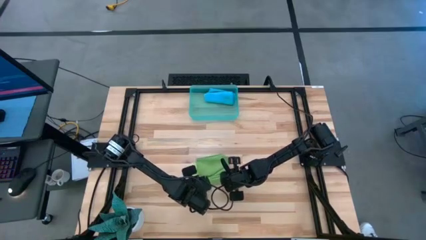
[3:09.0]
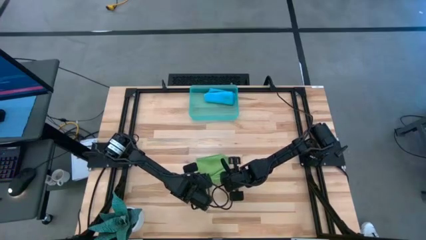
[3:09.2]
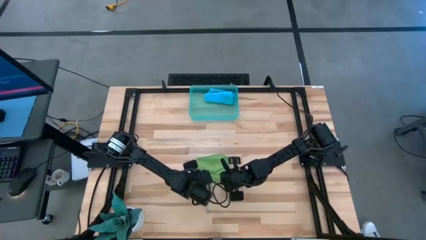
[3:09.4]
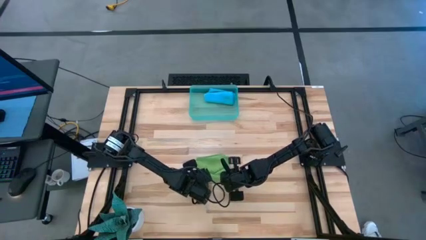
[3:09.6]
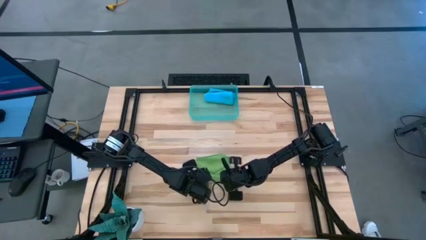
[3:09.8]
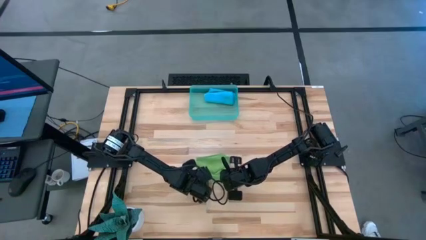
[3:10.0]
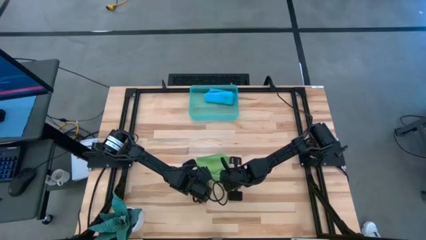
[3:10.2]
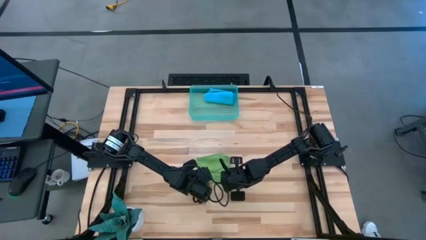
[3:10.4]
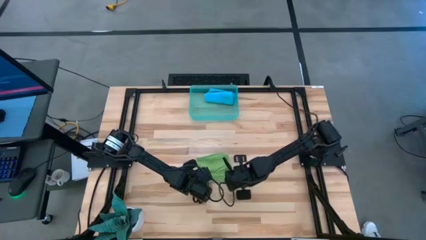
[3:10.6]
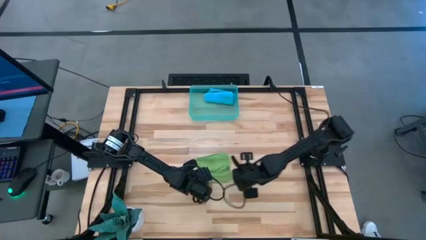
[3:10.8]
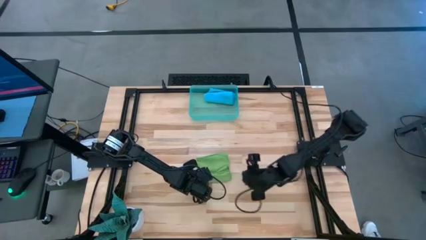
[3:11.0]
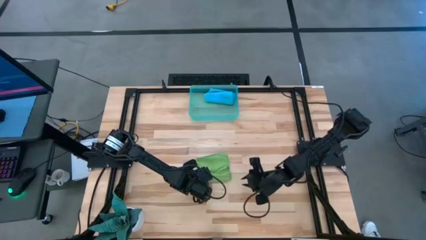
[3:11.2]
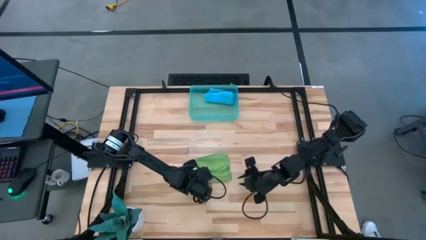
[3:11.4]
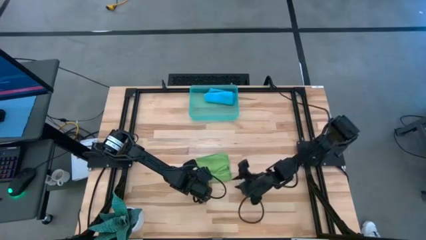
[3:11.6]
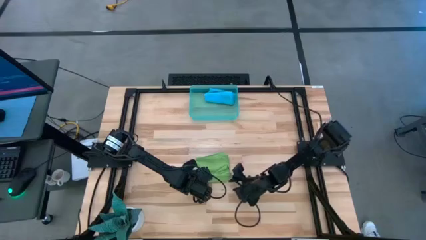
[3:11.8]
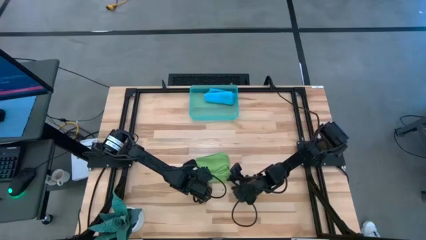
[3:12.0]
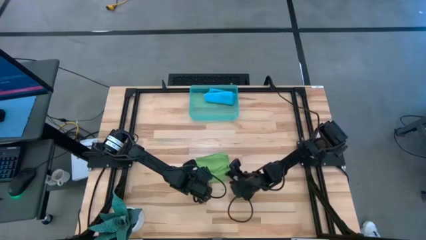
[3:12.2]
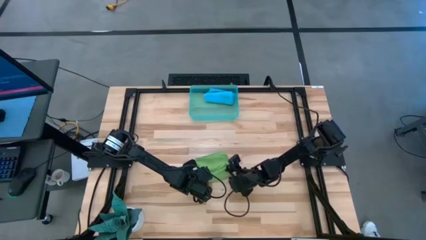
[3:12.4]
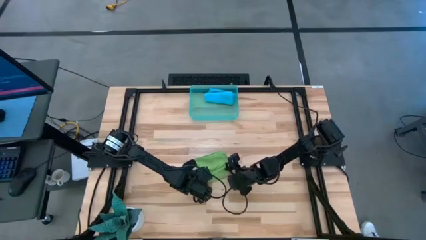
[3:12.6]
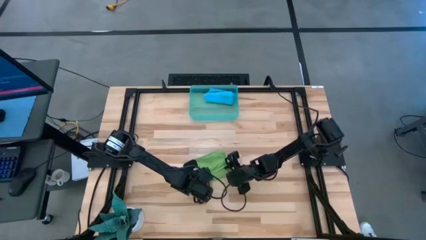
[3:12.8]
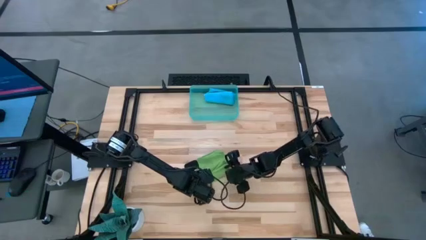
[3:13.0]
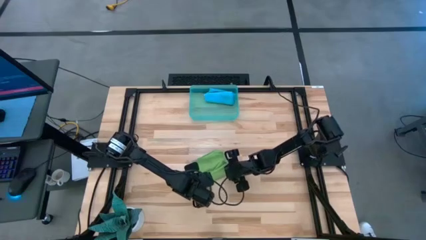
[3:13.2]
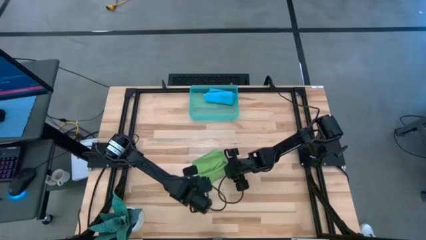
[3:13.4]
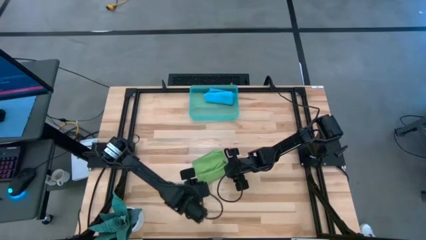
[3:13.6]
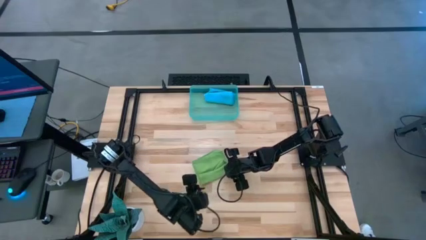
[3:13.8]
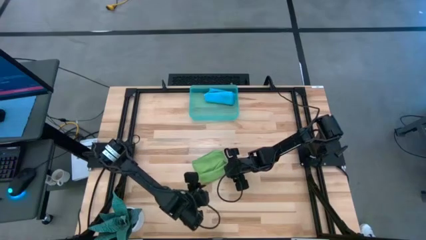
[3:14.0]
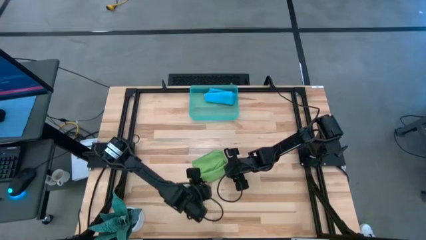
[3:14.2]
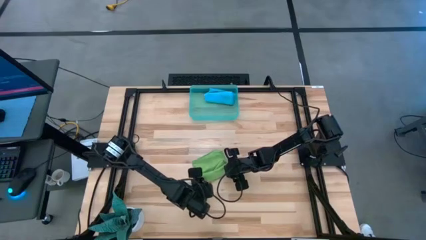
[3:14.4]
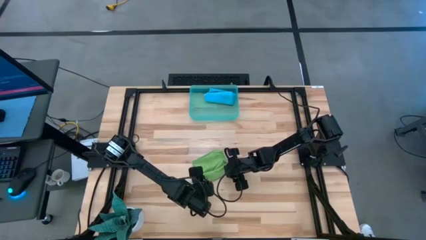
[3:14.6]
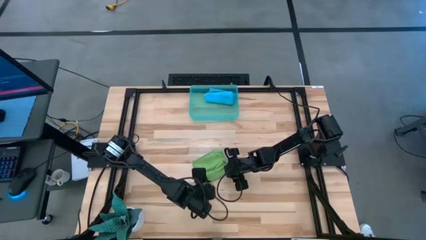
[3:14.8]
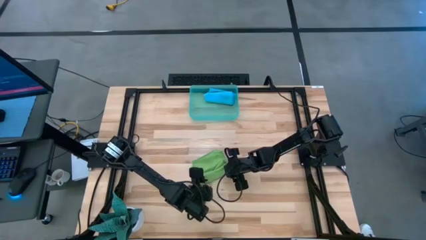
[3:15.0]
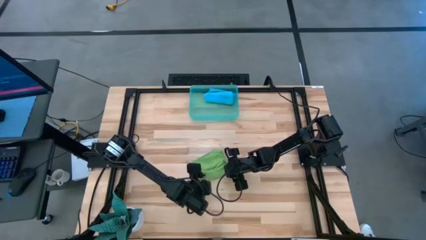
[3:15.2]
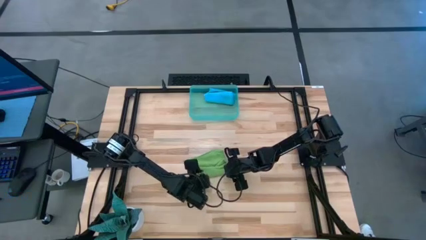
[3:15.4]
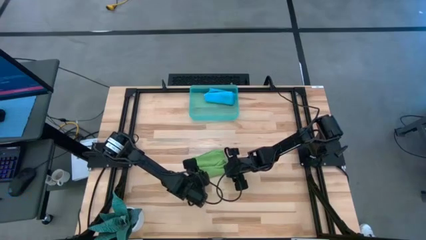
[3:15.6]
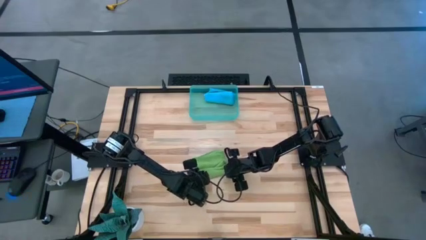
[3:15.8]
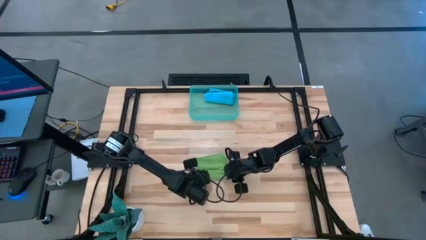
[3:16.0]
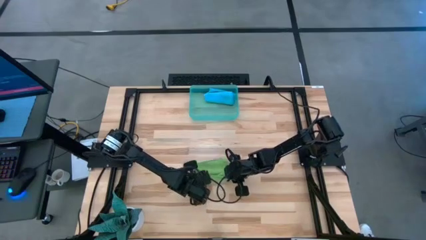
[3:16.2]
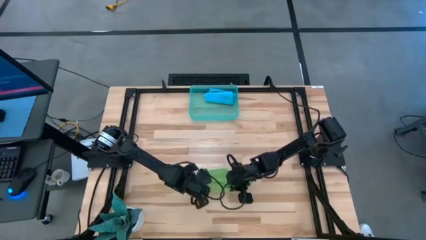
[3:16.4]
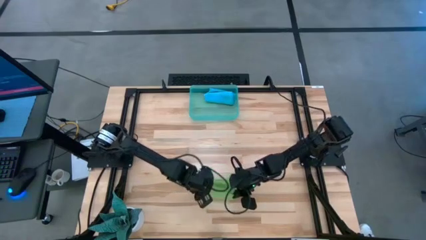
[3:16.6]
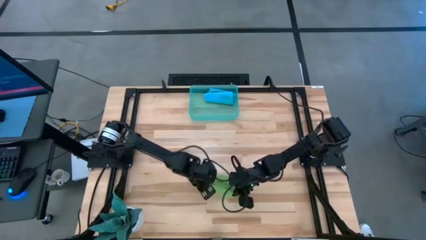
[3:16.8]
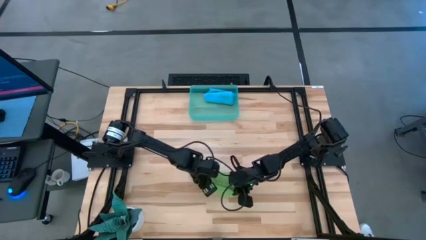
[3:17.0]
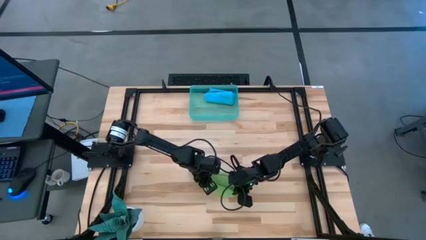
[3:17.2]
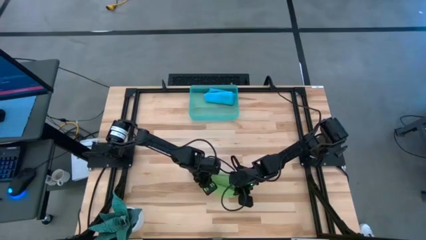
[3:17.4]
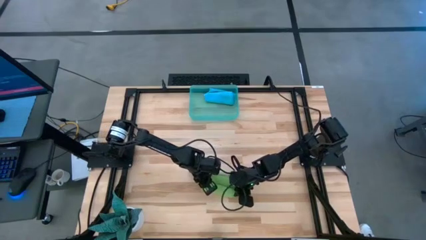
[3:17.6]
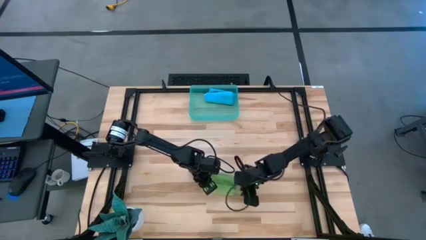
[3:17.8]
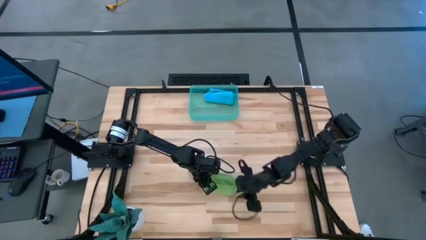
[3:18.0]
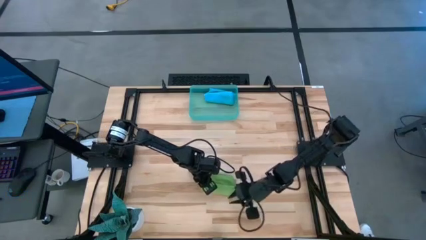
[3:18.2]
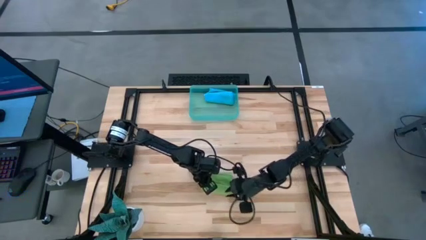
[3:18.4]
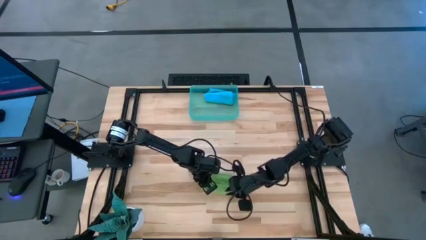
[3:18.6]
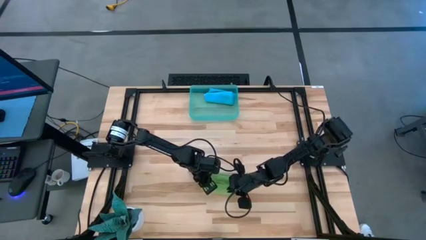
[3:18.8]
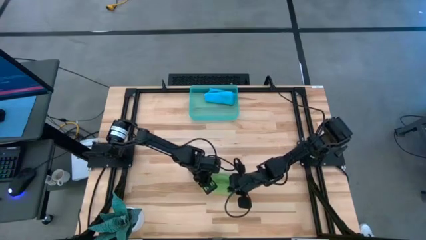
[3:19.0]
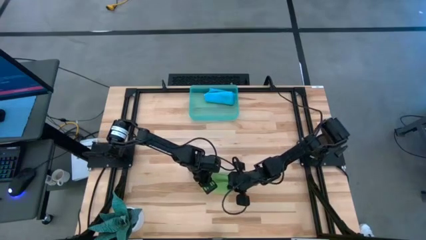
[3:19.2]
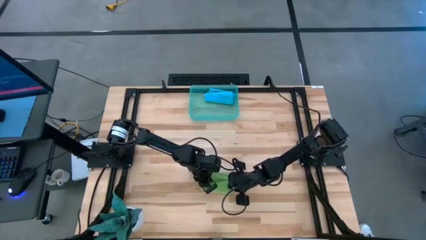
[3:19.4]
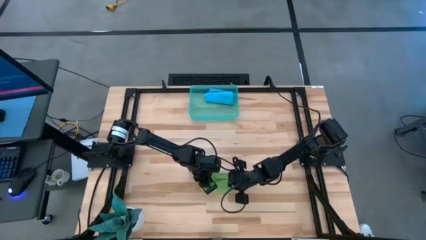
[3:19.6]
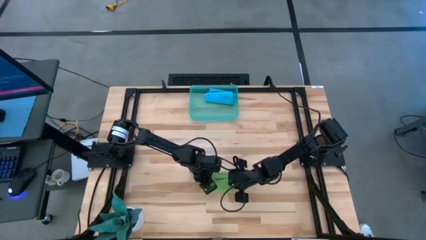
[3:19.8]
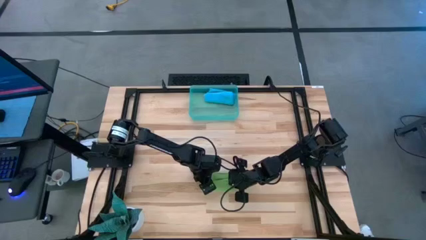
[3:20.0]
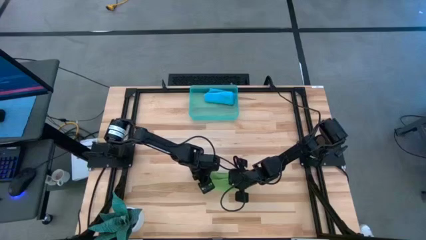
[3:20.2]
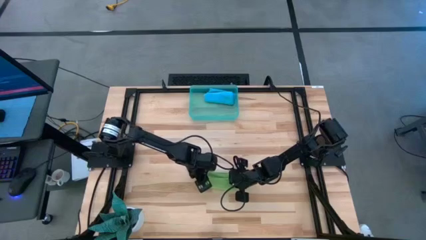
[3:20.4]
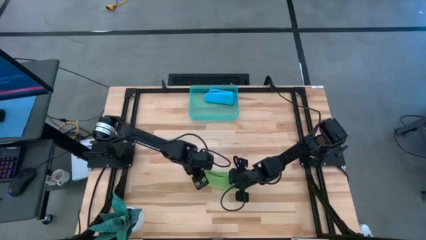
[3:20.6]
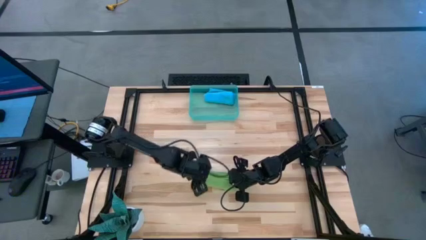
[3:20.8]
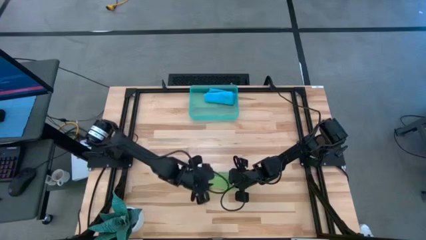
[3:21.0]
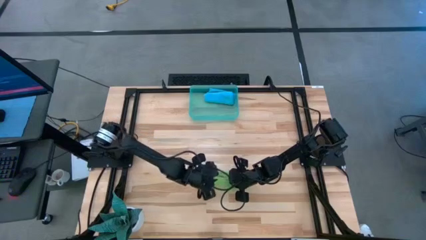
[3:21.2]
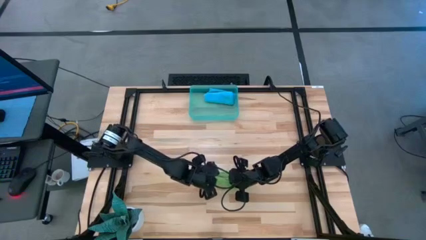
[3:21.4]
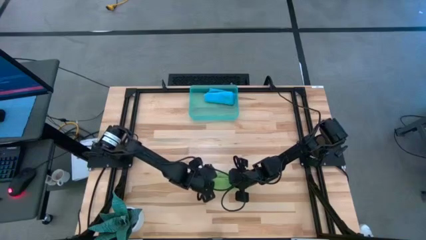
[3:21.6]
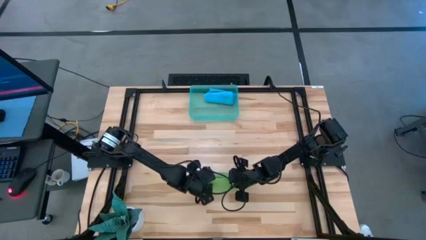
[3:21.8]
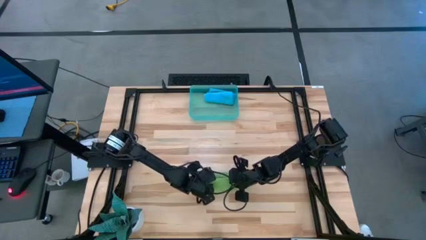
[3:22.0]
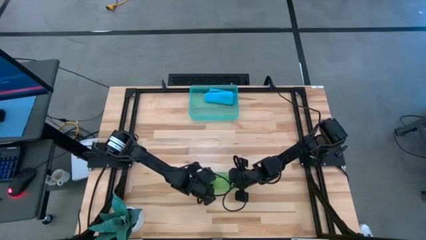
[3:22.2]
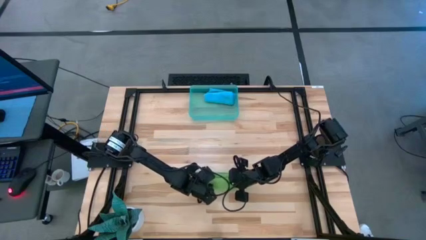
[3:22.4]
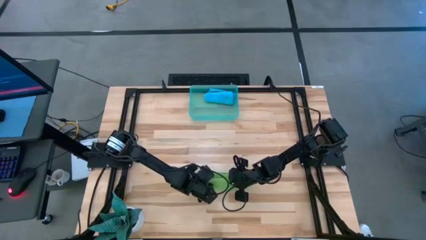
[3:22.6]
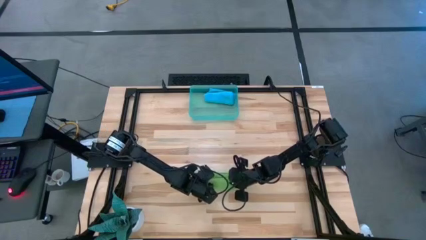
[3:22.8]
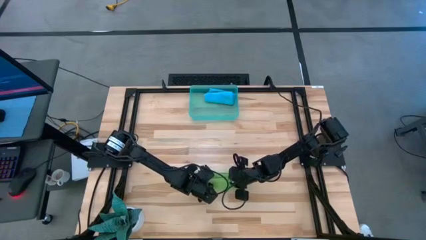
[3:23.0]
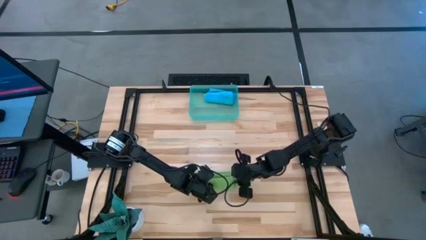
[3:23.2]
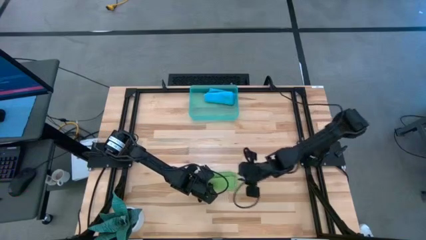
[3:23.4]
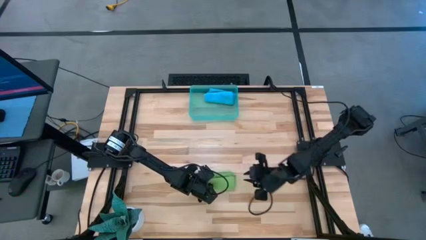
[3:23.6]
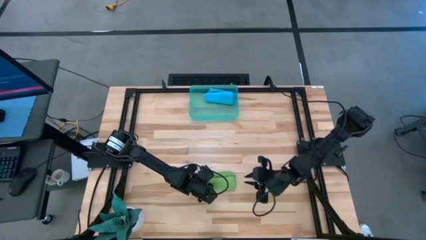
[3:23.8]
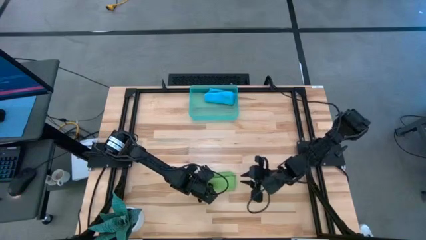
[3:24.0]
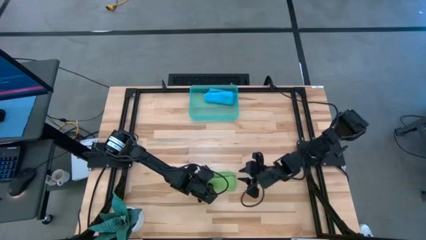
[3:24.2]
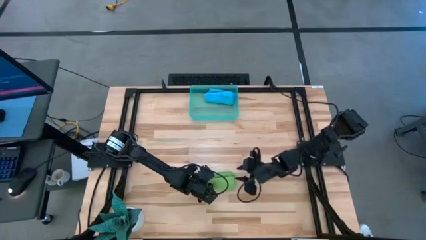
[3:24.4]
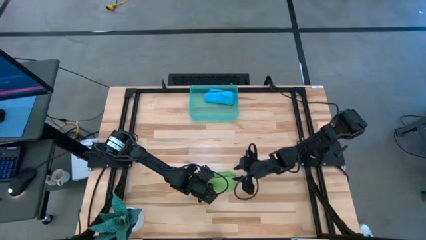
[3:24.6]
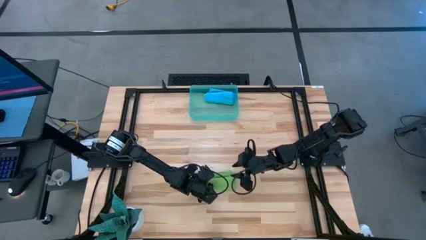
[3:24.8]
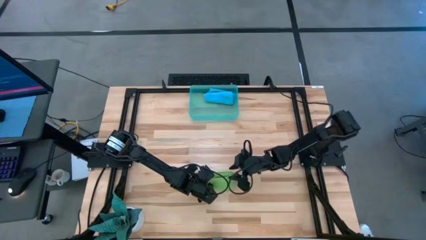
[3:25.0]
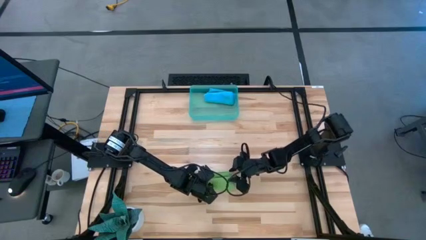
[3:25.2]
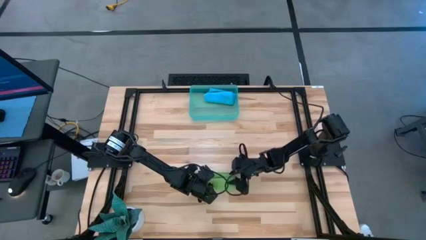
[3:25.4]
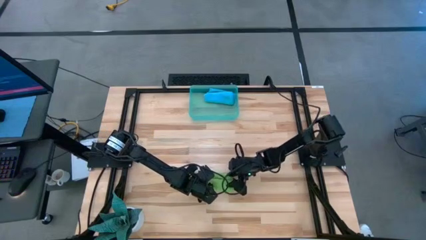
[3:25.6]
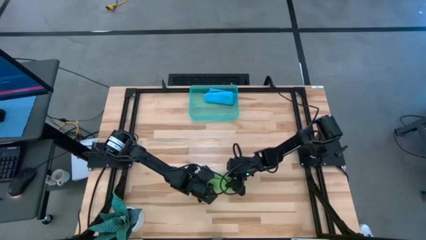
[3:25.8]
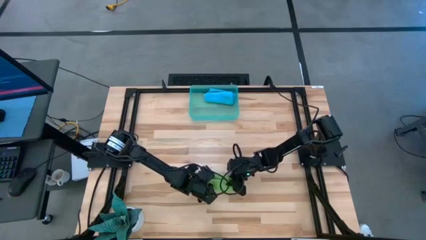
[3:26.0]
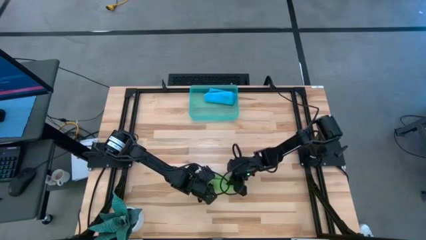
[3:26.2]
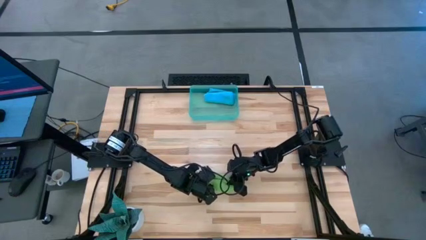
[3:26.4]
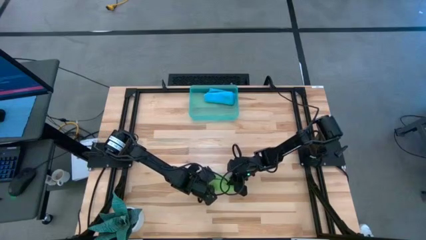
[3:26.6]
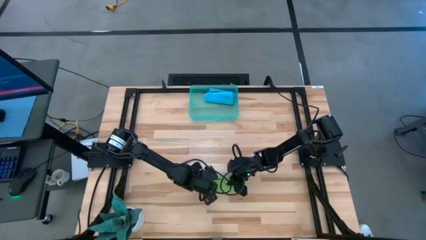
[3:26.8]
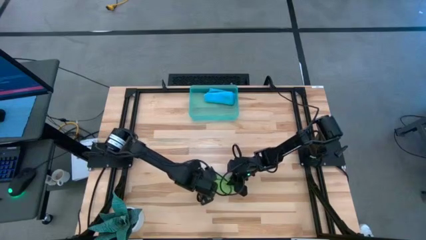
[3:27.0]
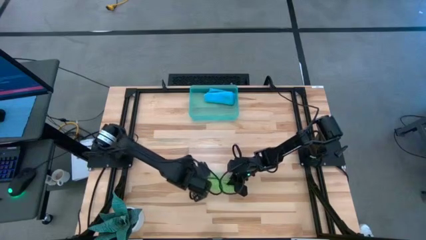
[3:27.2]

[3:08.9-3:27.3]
Task: Roll microfiber towels into tight, uniform cylinder then place into a basket
Roll the green microfiber cloth
